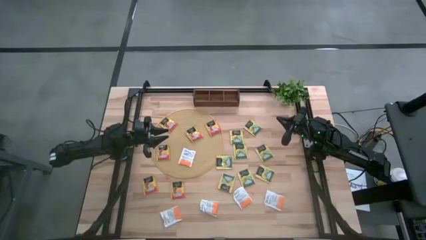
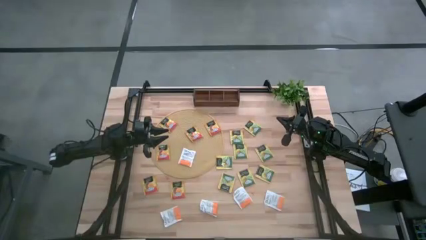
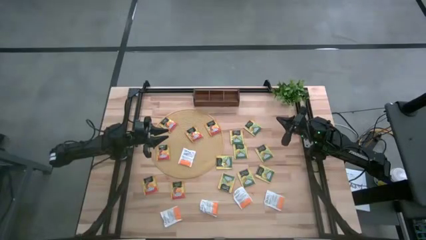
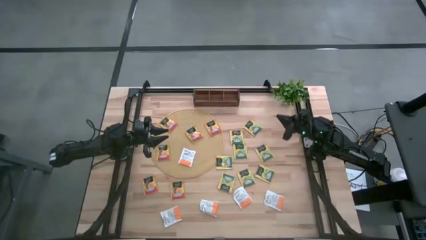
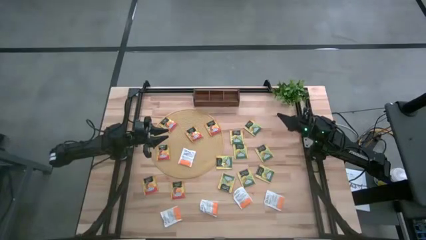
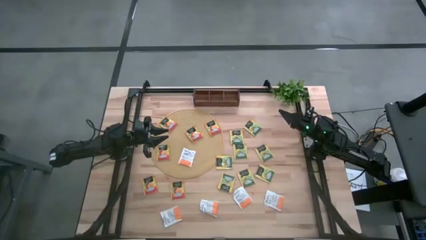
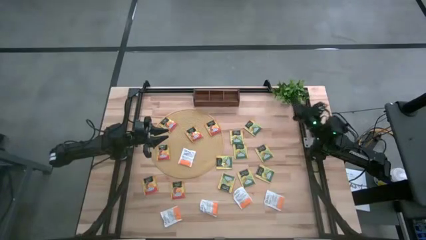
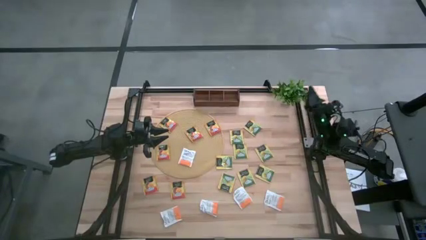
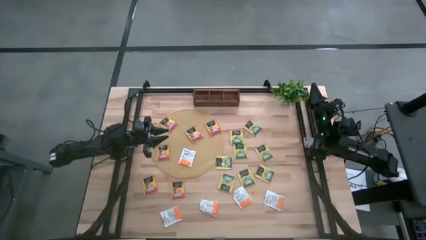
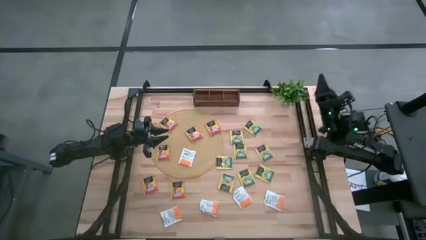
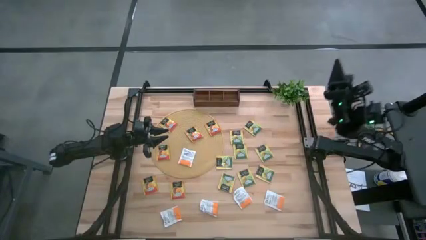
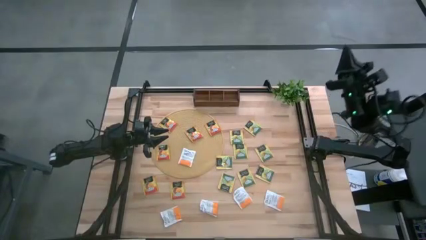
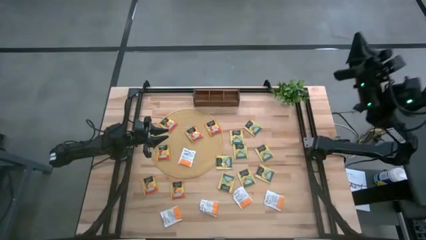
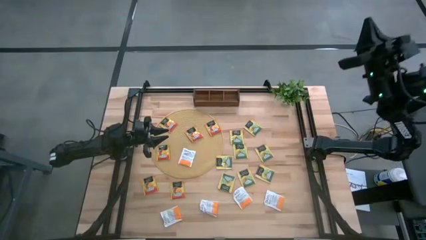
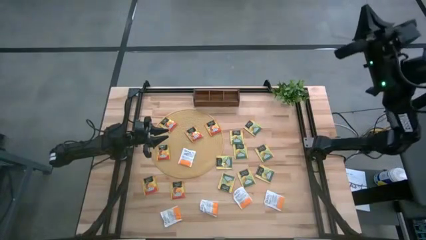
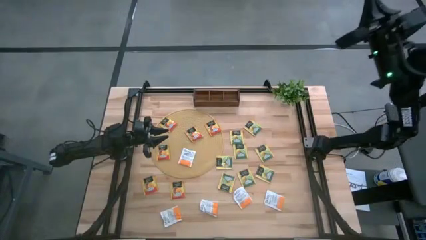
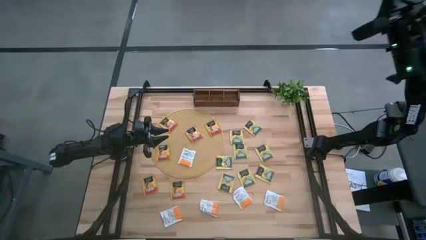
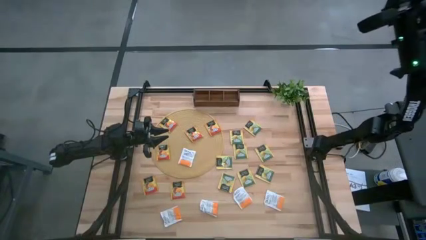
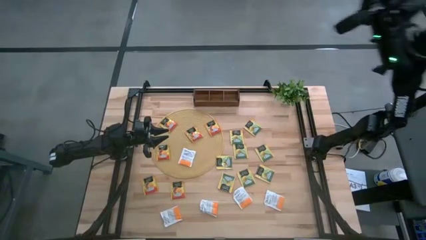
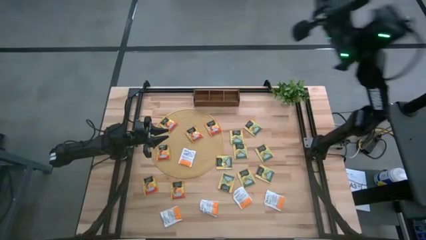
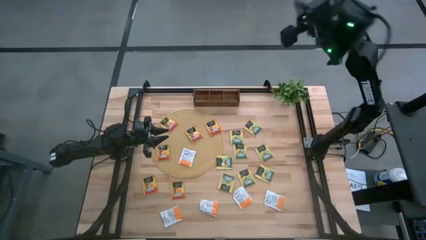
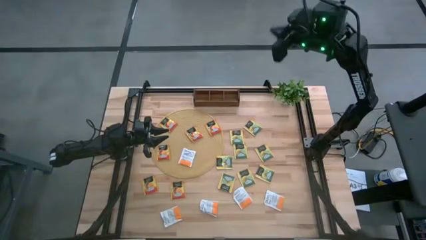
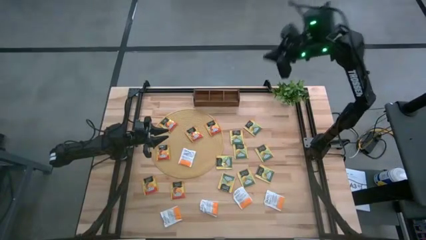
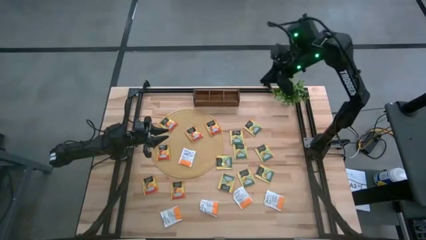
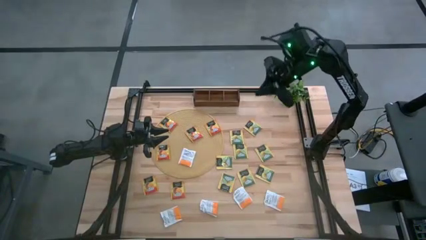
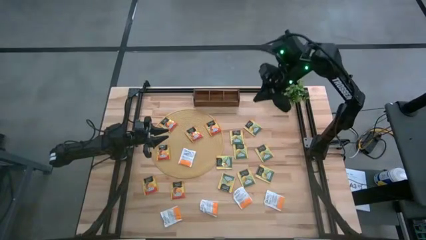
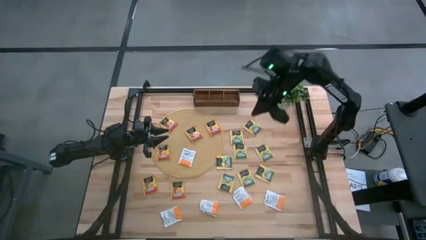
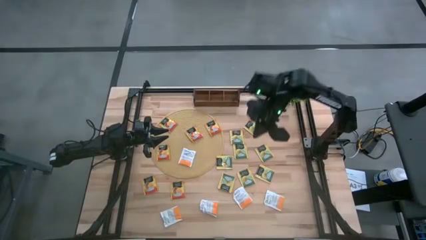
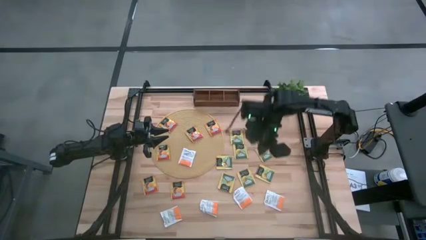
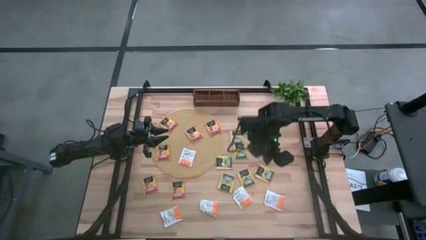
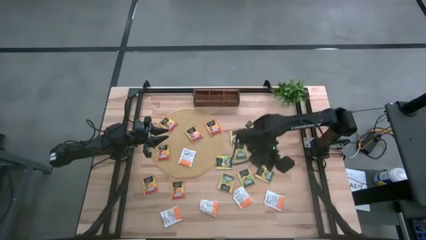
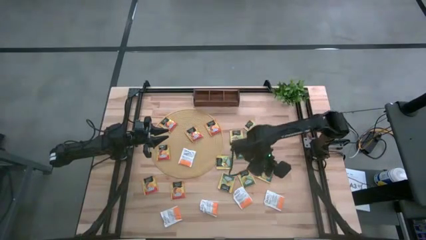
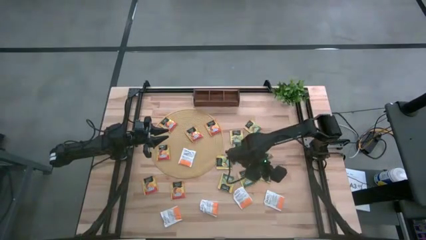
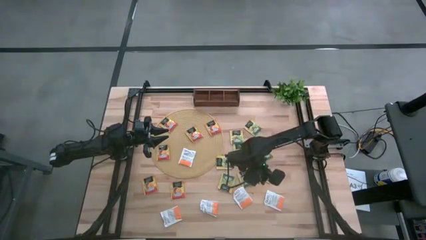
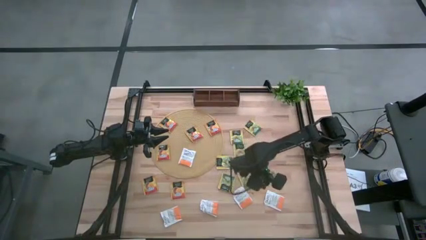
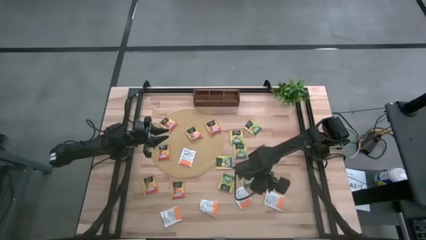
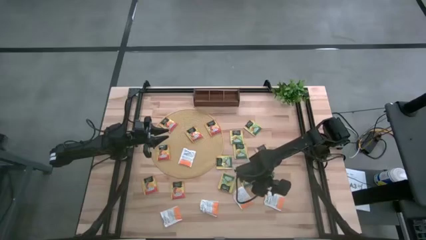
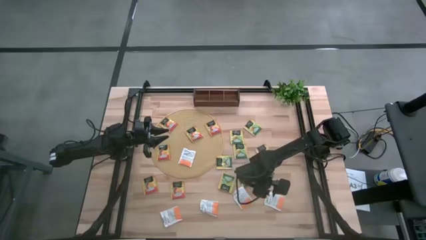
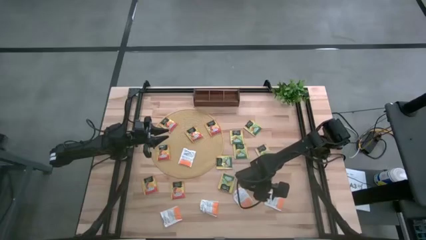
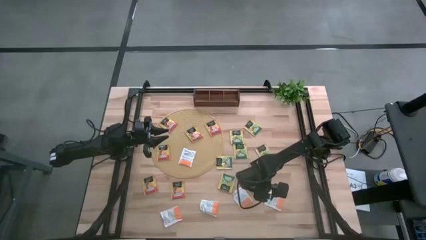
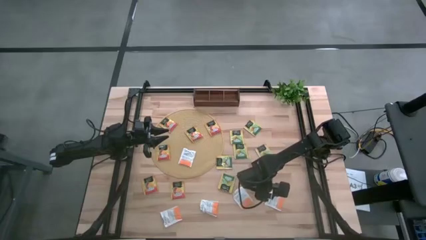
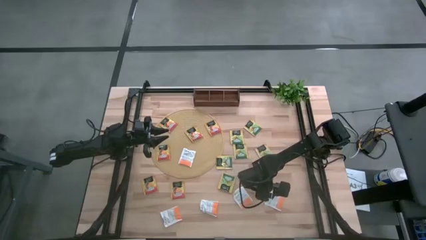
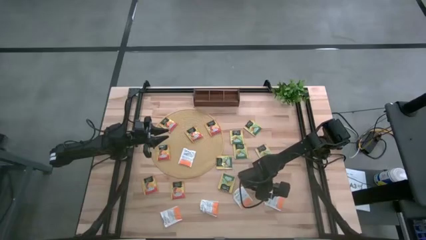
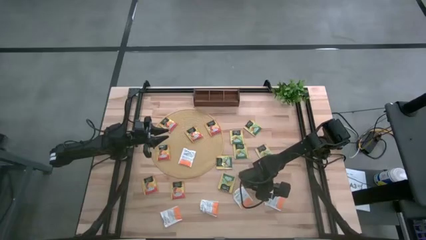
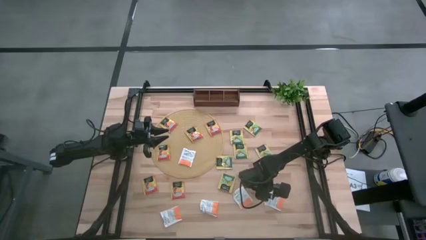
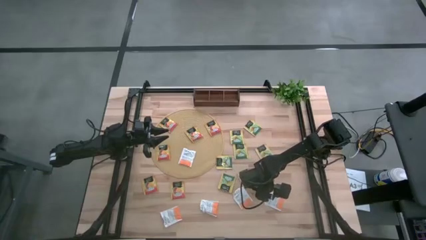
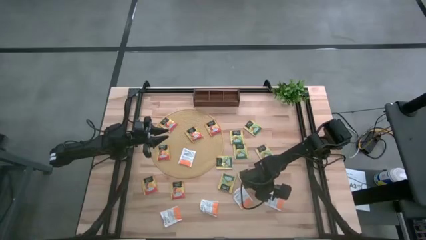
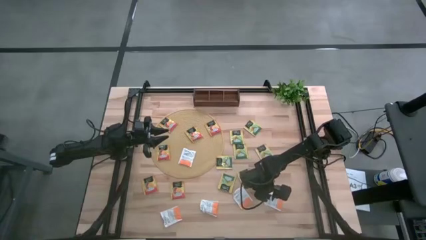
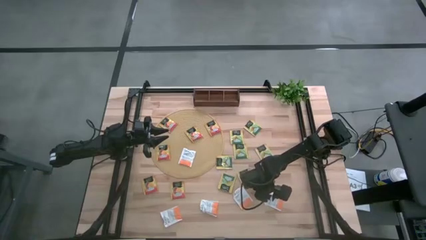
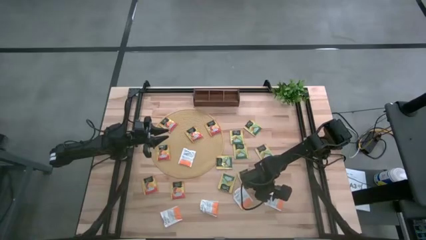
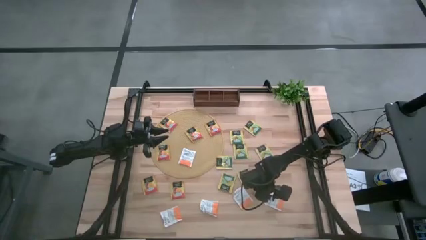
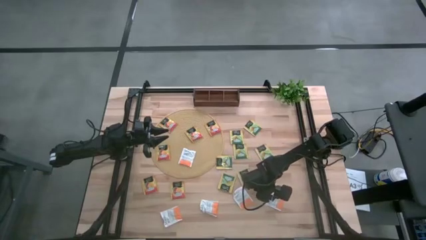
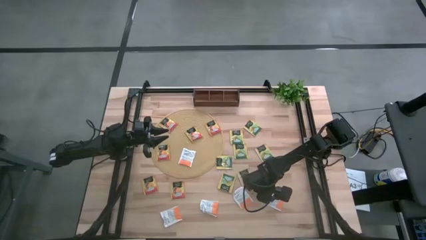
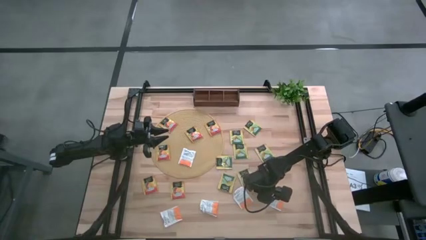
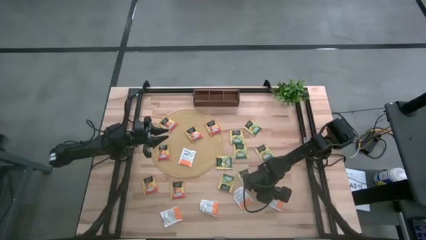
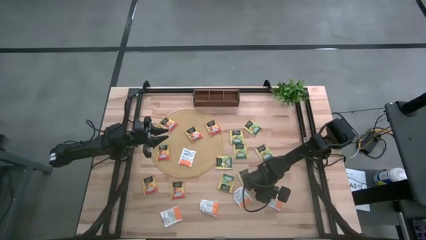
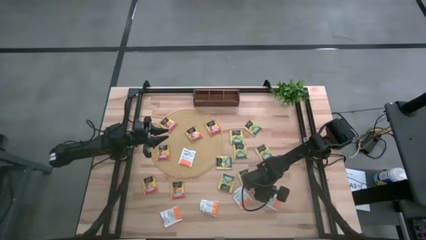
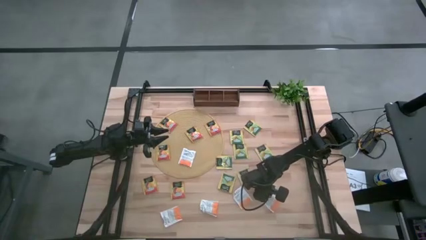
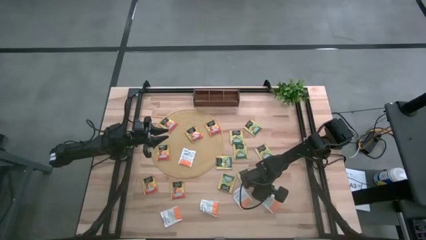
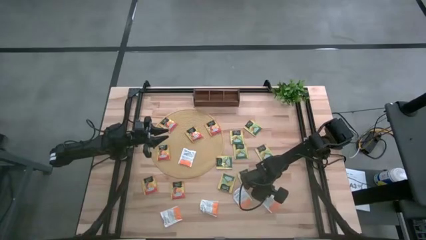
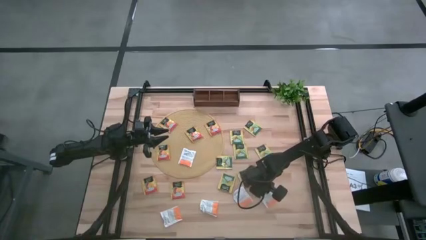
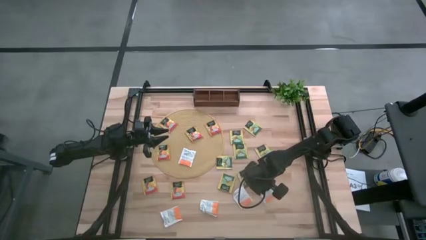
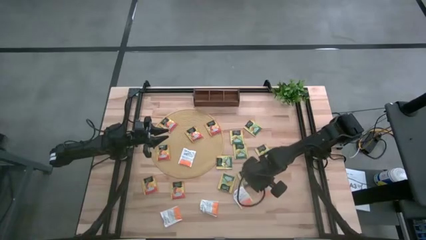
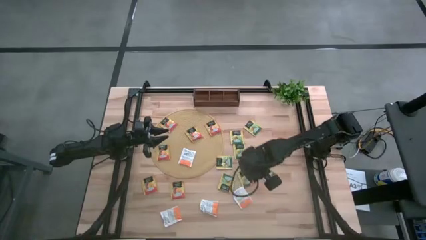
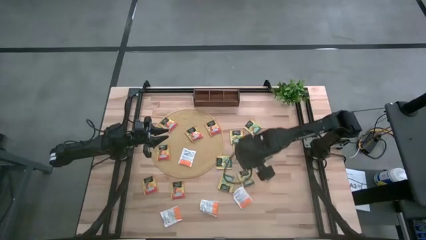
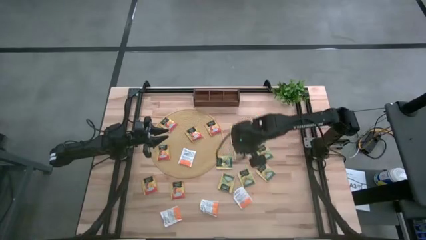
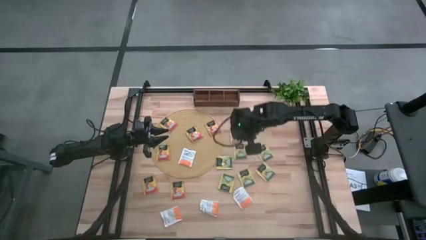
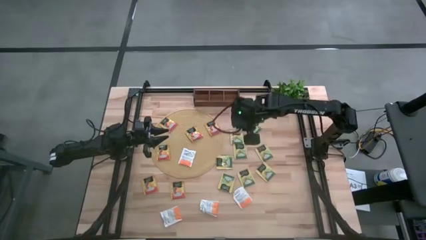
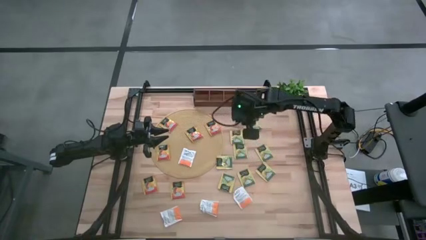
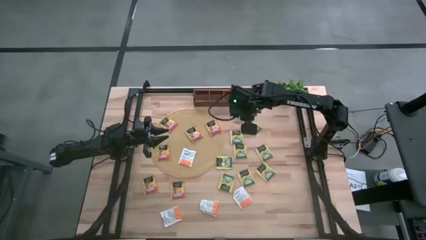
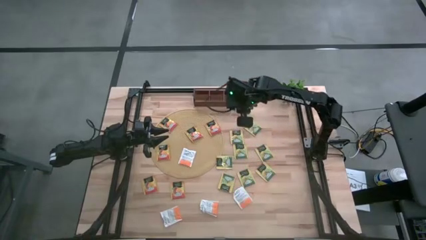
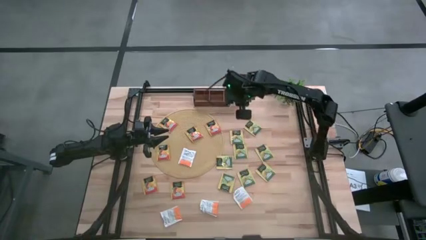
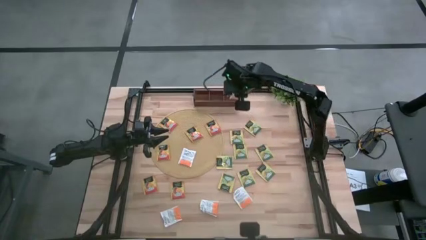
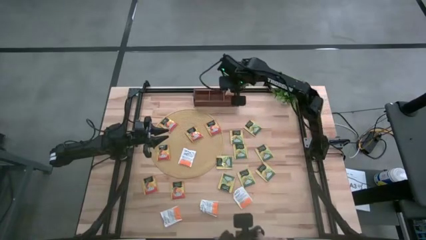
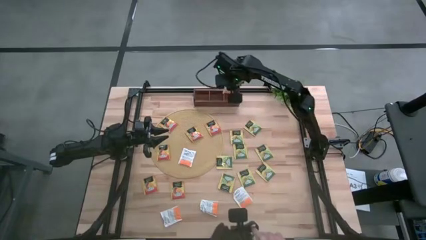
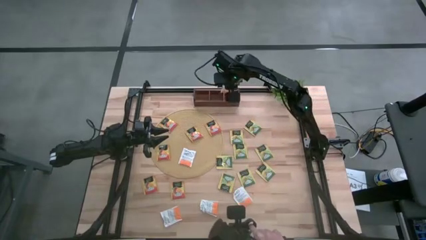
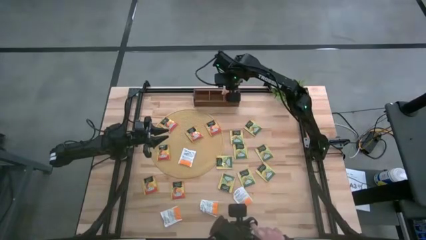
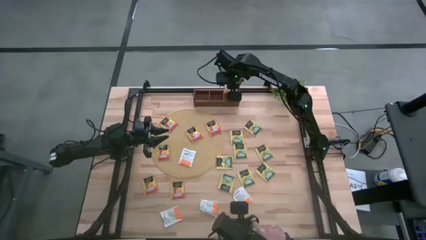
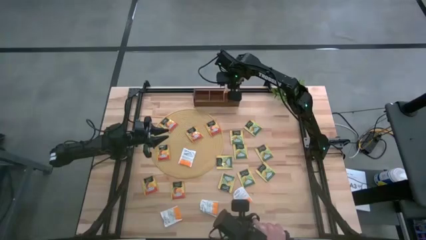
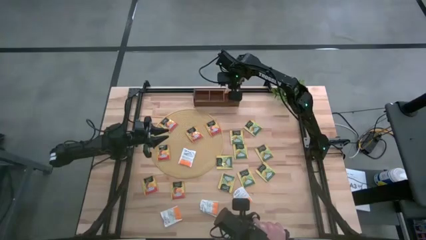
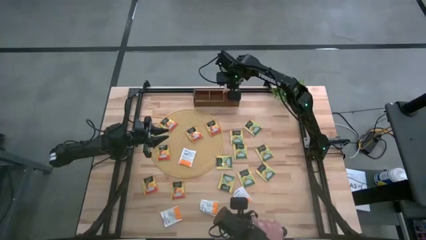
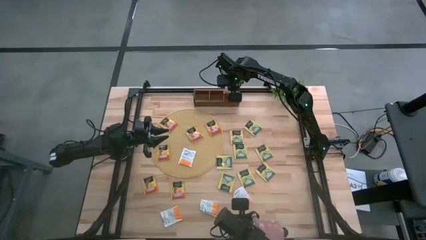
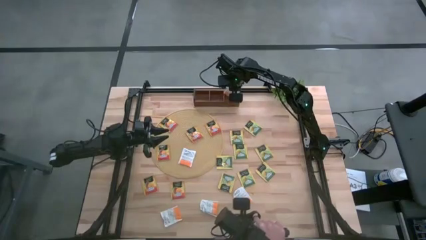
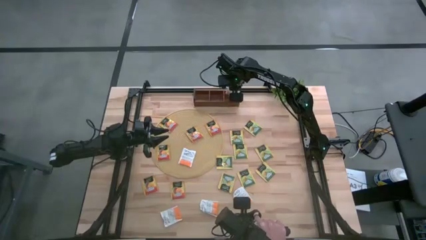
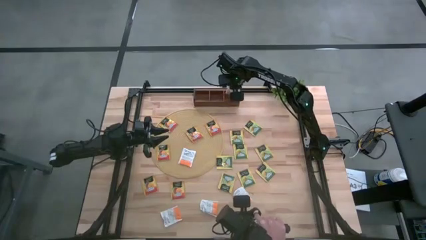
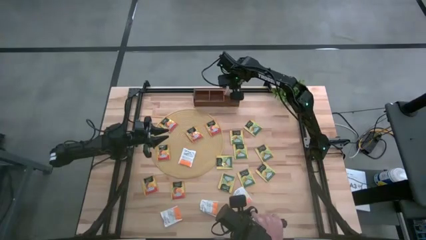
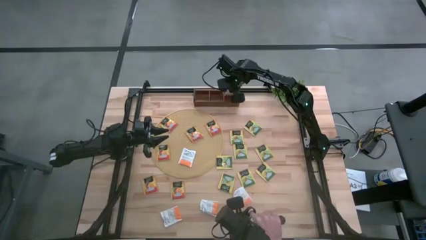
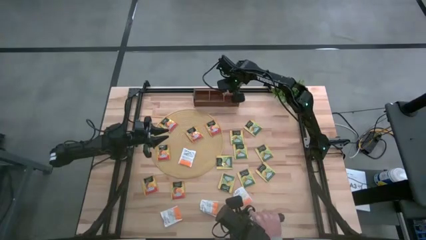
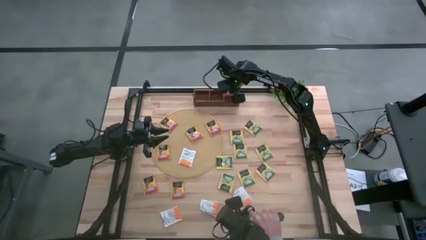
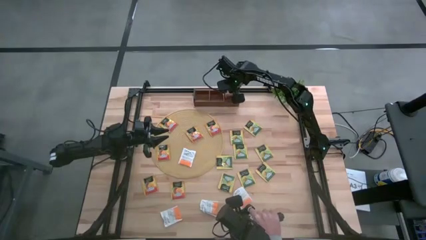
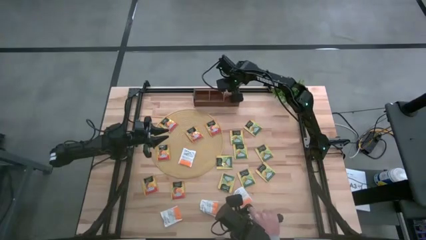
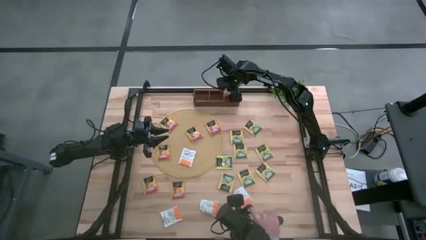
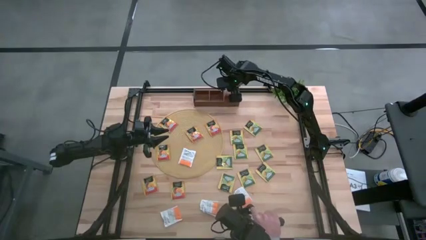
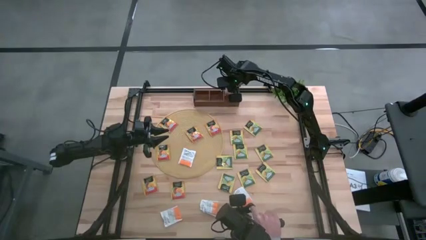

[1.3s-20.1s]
Task: Pick & Place Tea
Put the white tea bag into the right section of the wooden organizer
